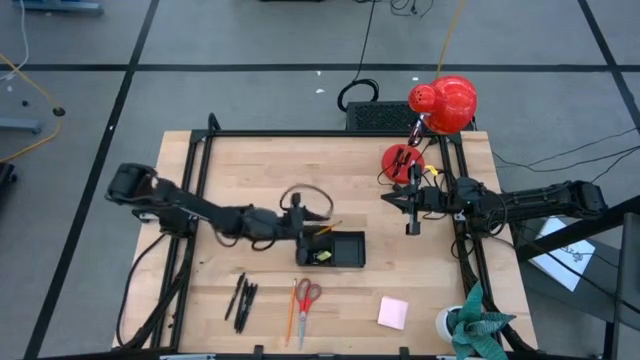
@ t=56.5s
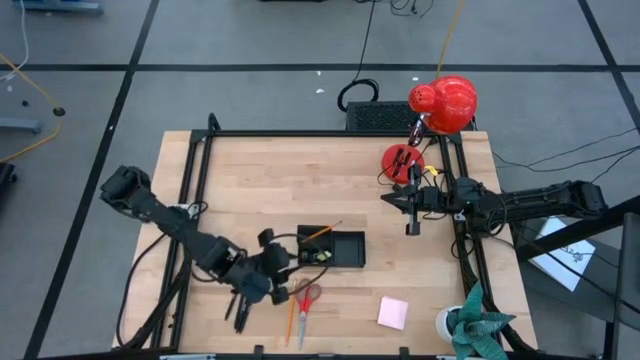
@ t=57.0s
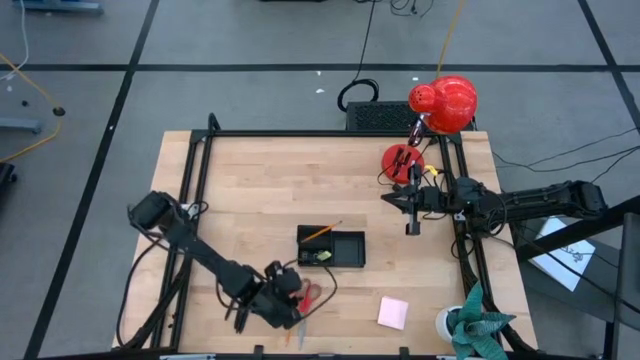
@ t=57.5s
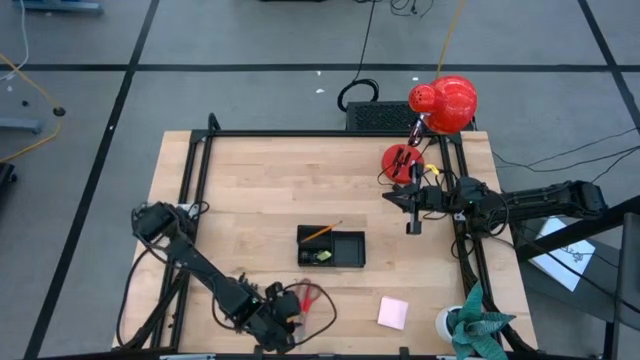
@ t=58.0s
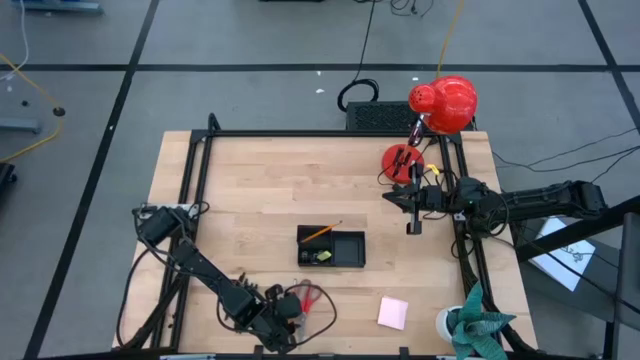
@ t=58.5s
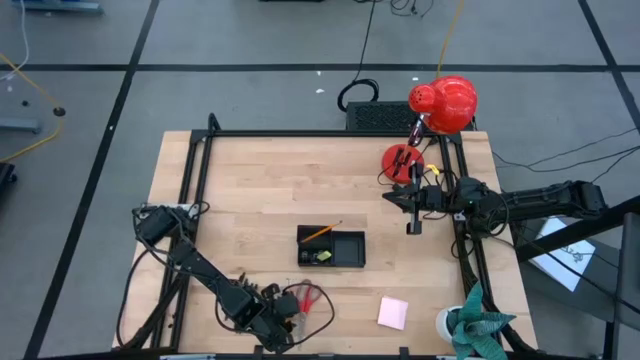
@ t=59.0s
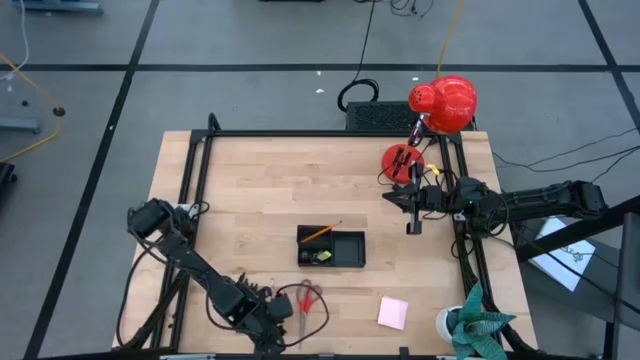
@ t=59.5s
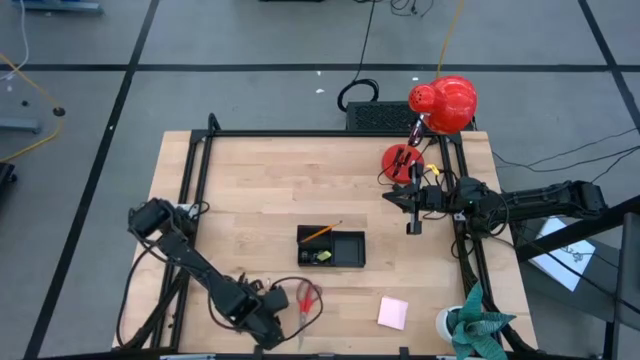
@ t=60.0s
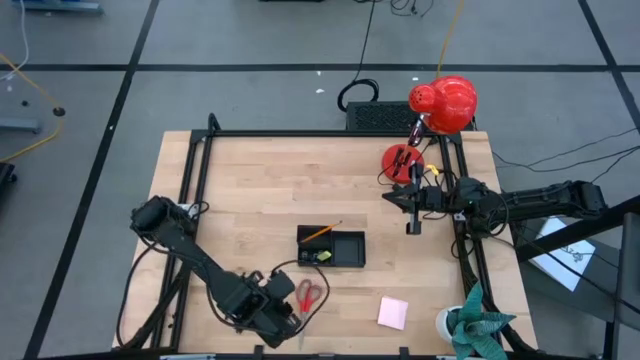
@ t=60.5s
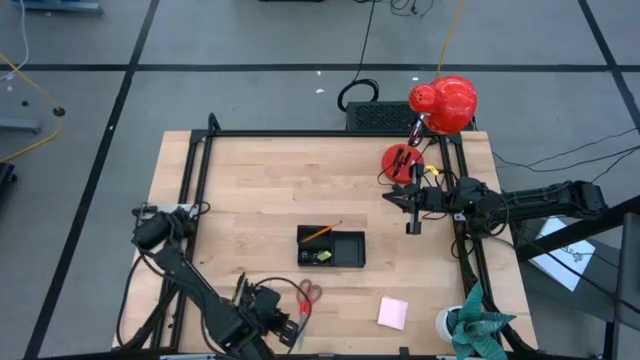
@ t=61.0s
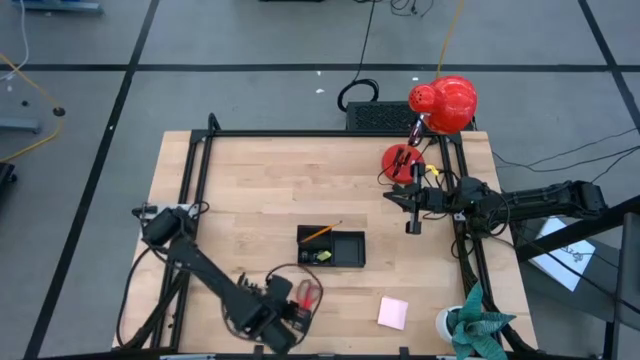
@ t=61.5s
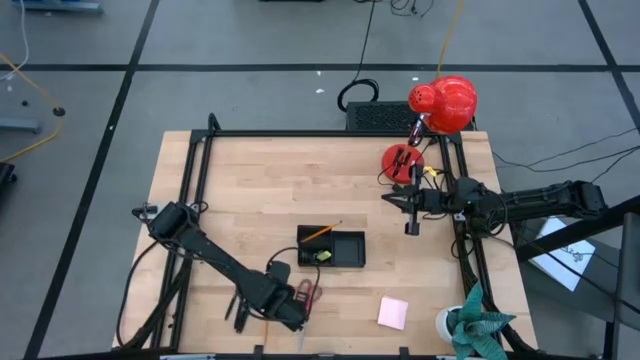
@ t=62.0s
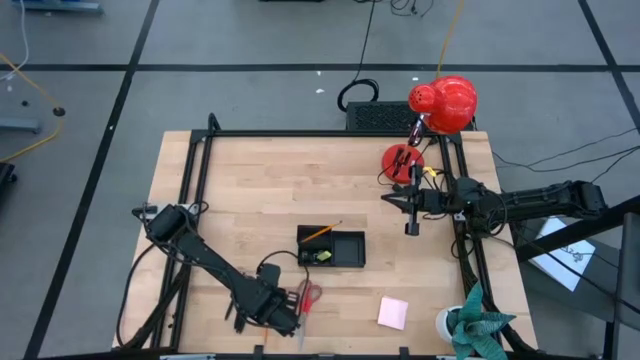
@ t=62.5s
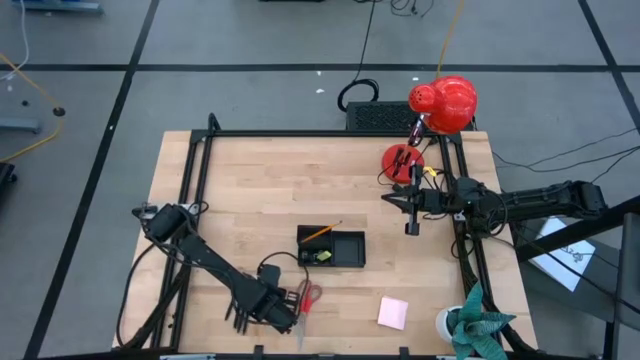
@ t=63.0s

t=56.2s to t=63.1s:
Task: Pick and place office supplies into organizer
Put the orange pencil into the black desk organizer

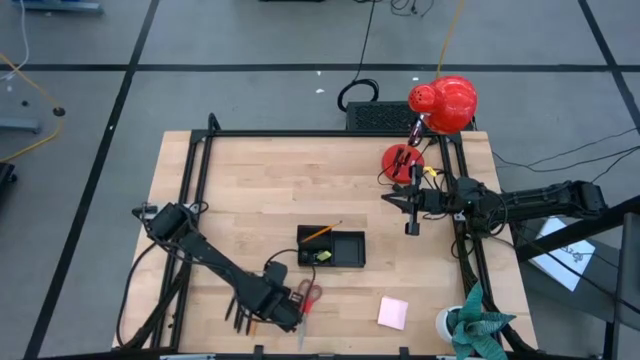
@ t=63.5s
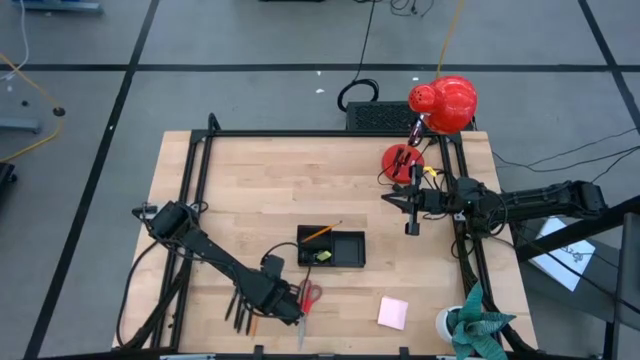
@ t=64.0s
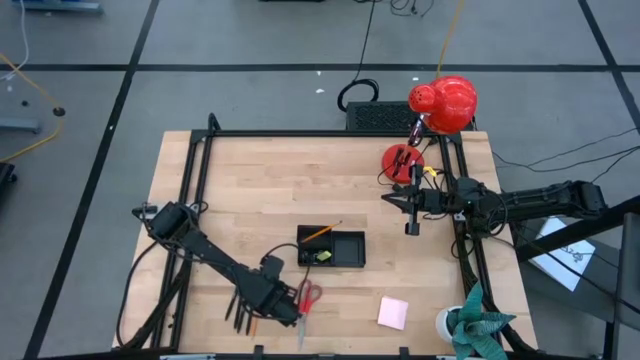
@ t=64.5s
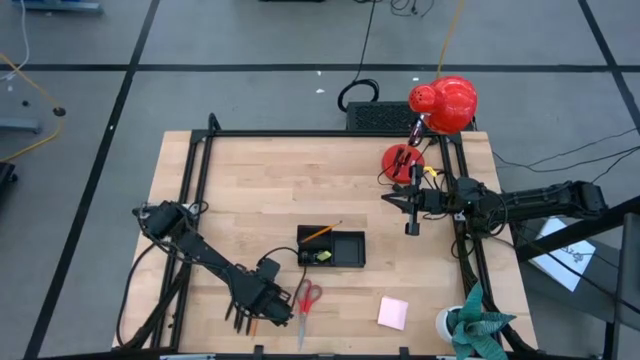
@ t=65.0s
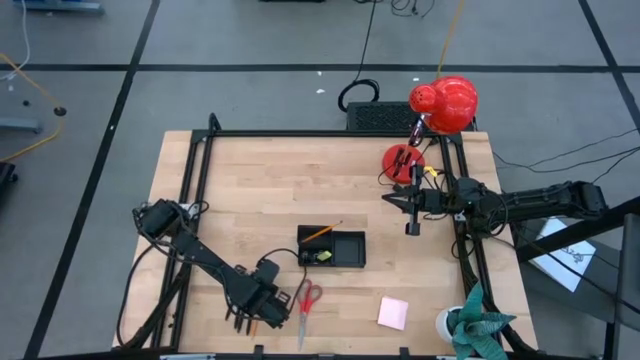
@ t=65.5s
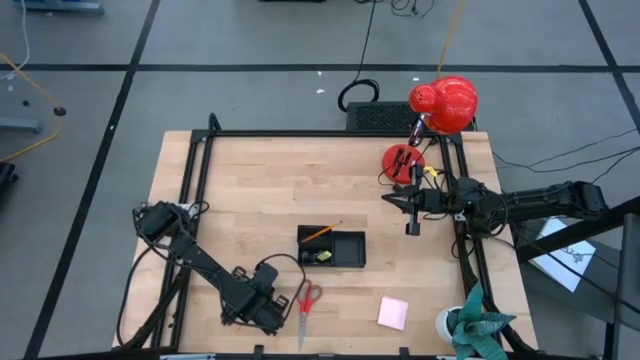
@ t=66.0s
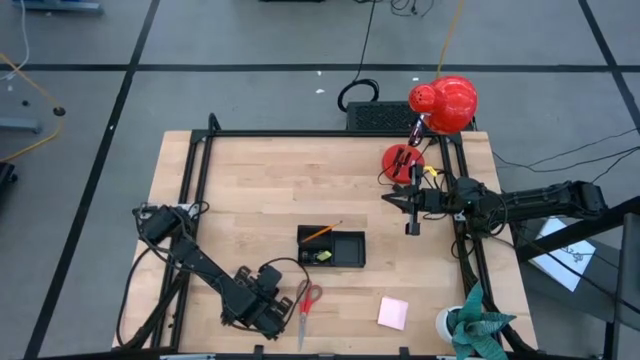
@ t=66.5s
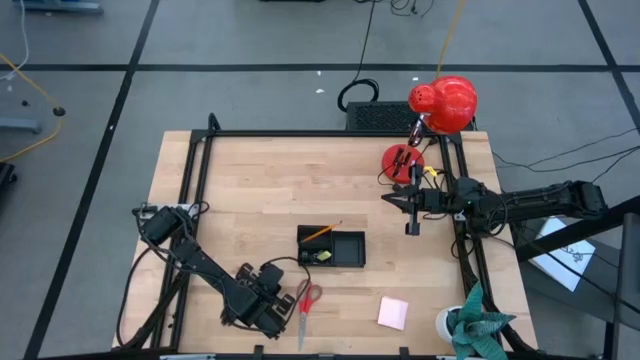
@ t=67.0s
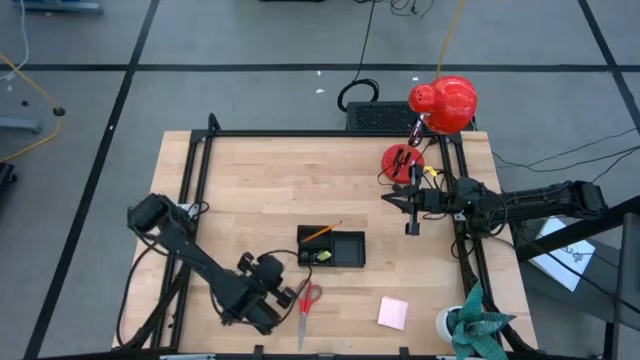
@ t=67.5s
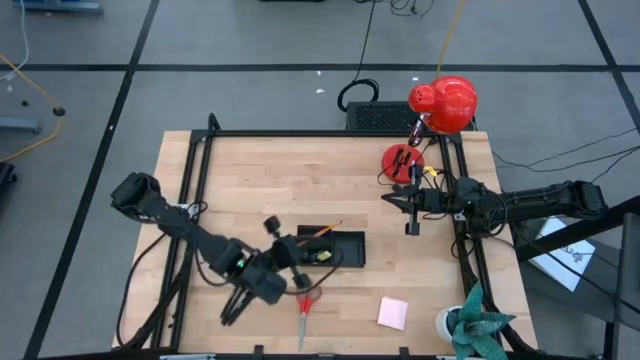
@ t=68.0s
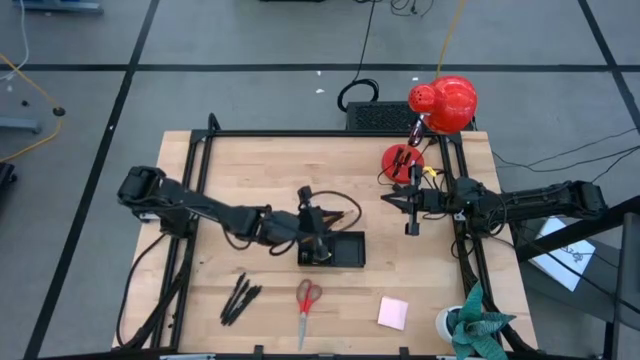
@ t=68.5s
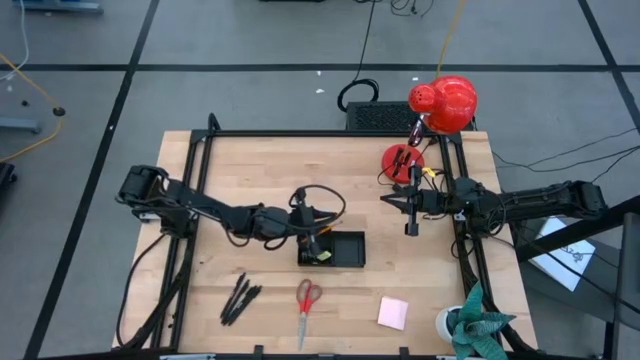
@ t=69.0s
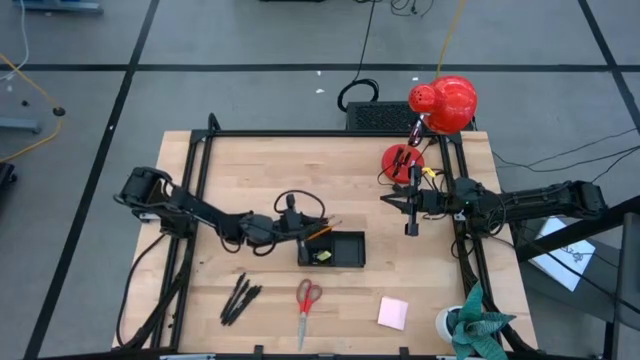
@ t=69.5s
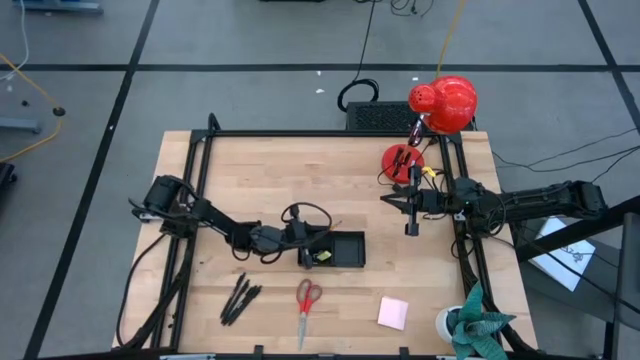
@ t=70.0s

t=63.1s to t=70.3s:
Put the orange pencil into the black desk organizer

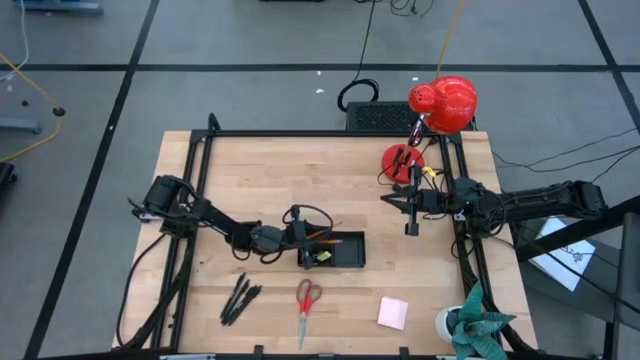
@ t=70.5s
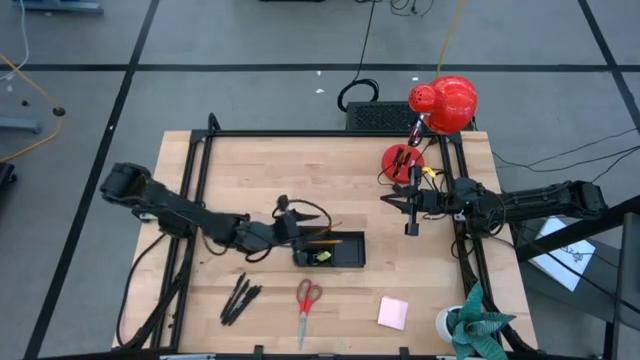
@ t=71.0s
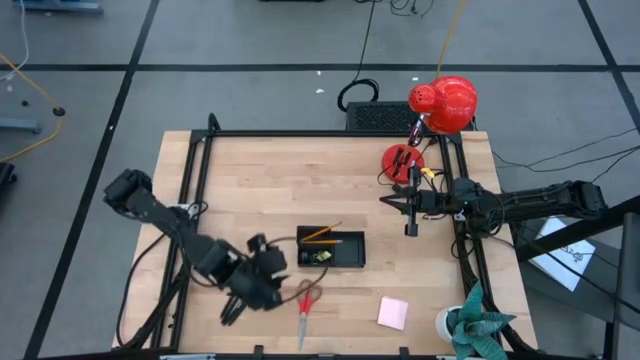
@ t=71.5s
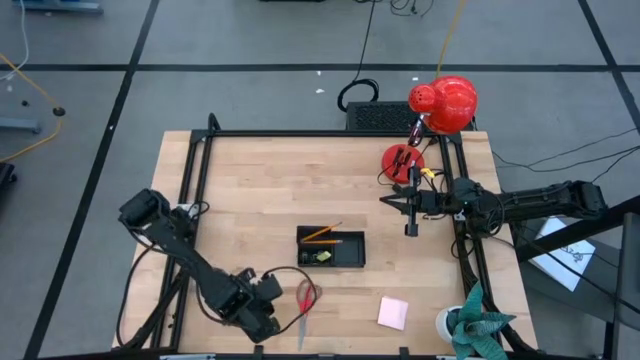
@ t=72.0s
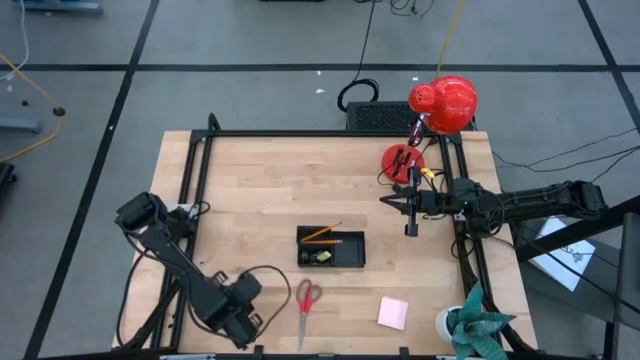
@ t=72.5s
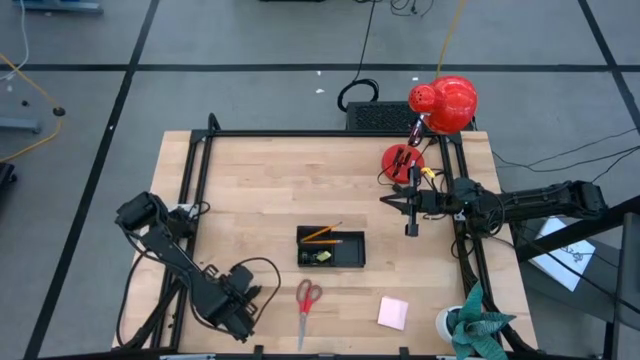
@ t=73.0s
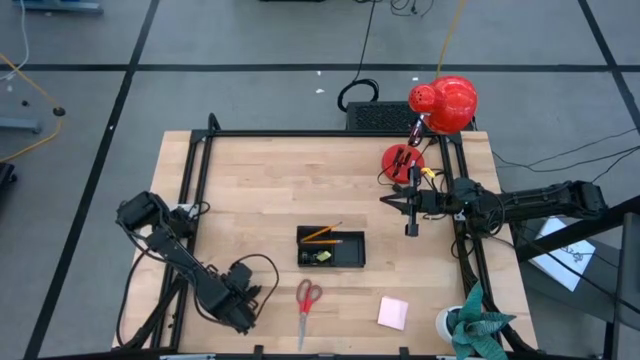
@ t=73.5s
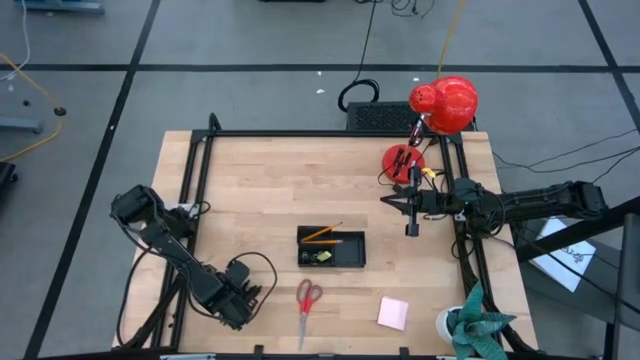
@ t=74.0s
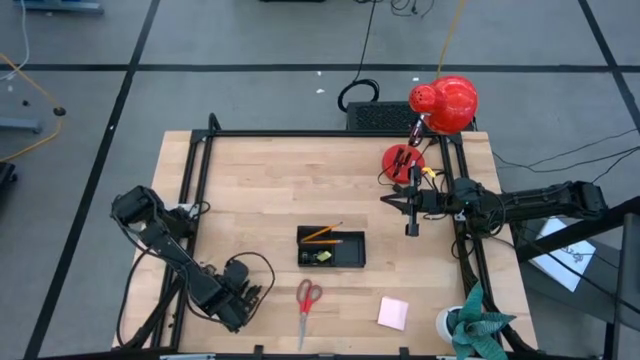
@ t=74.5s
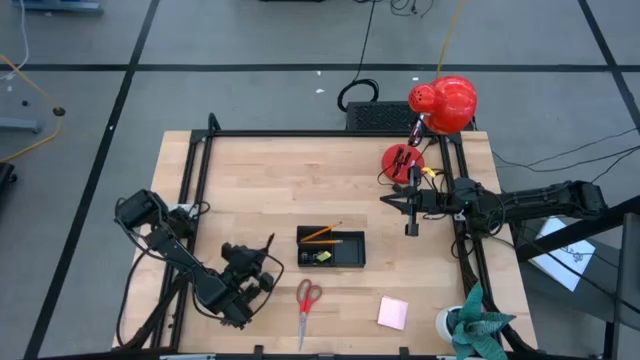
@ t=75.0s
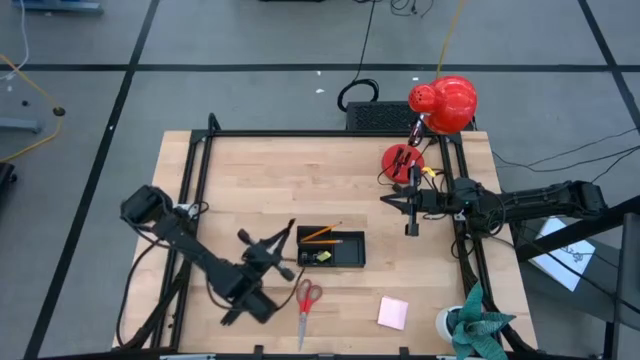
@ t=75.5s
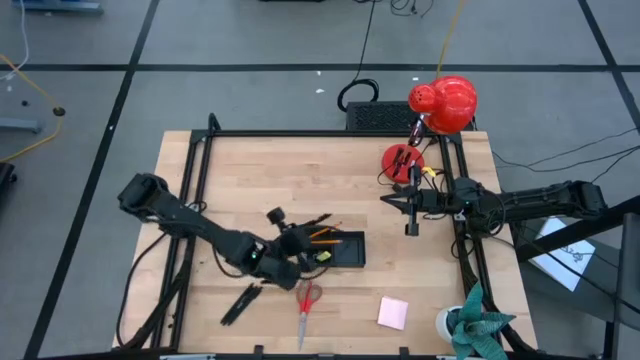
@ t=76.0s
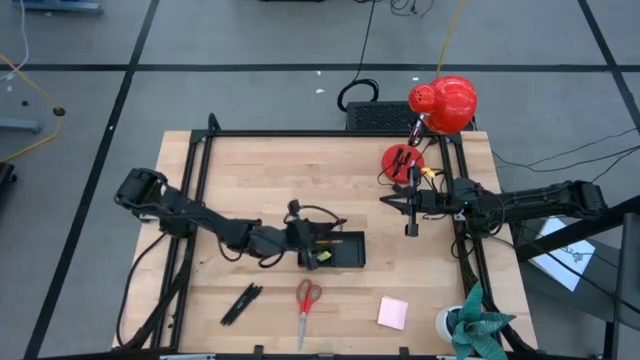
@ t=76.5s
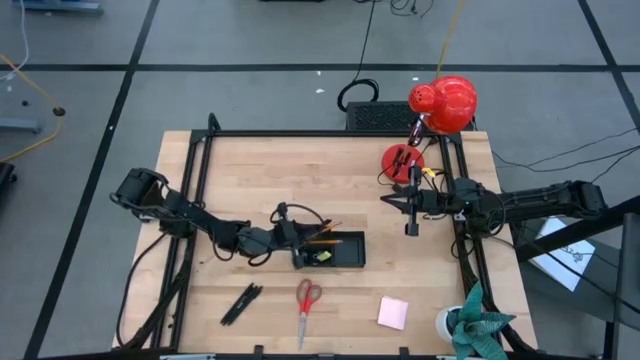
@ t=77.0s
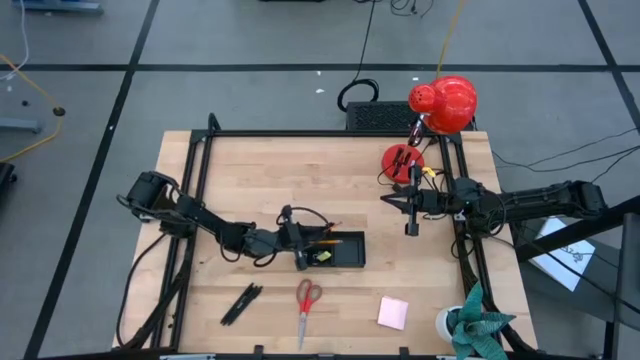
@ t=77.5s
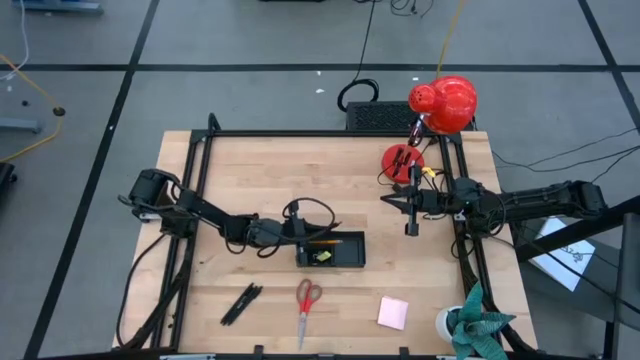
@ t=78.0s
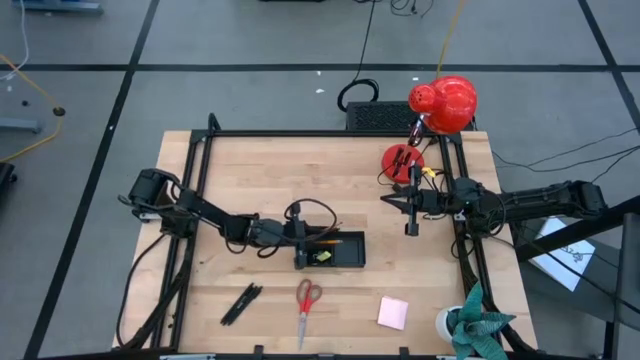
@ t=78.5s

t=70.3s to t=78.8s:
Put the black pen into the black desk organizer
